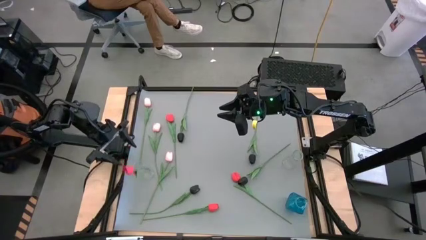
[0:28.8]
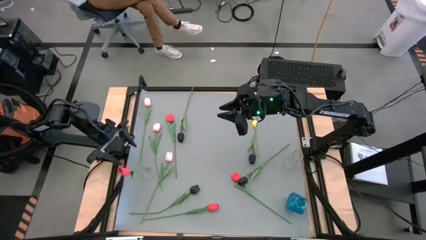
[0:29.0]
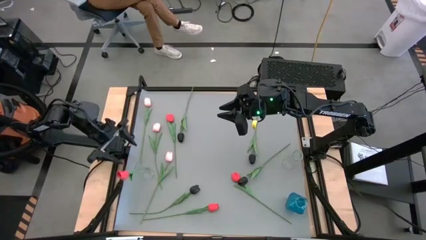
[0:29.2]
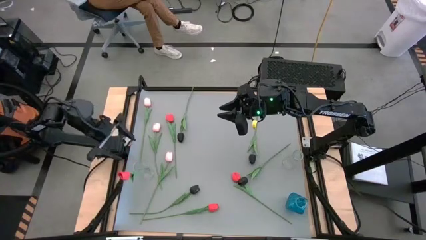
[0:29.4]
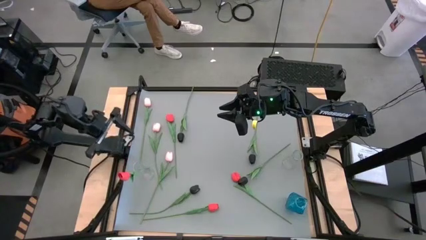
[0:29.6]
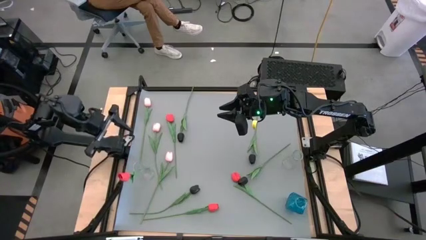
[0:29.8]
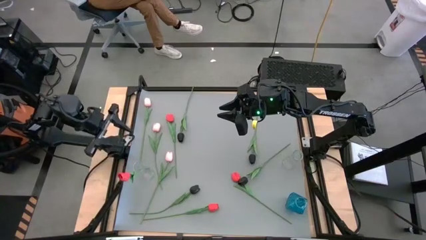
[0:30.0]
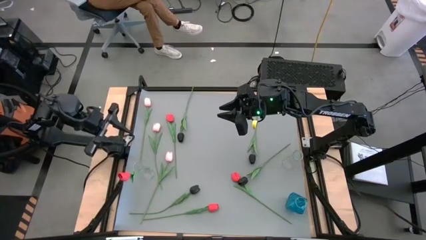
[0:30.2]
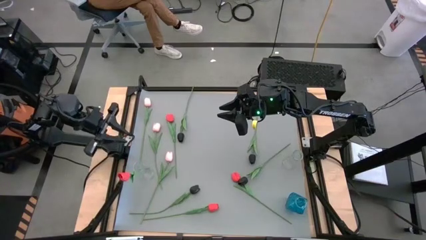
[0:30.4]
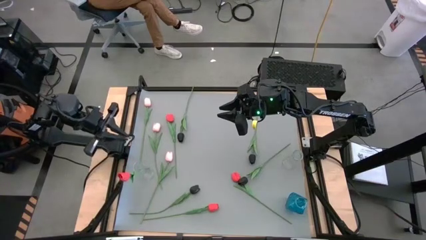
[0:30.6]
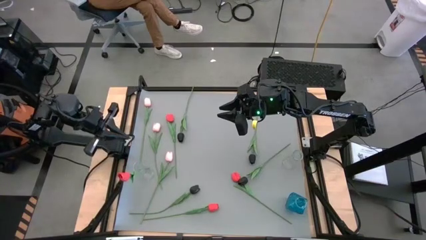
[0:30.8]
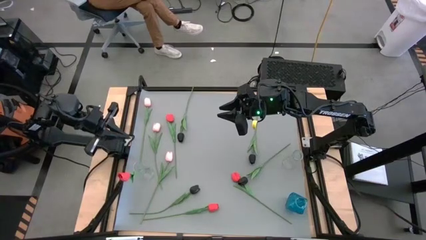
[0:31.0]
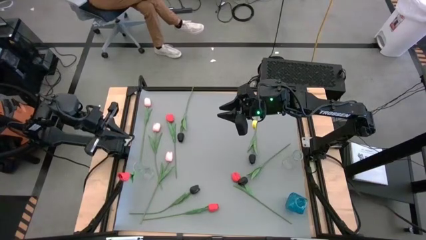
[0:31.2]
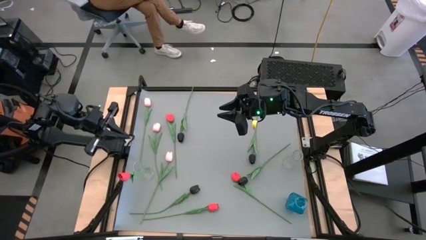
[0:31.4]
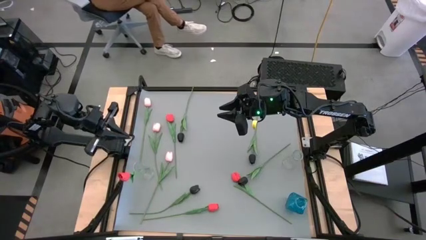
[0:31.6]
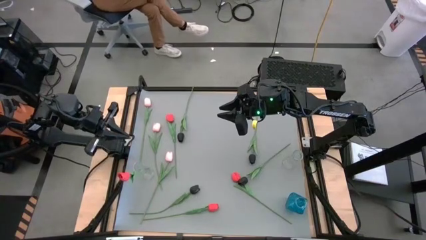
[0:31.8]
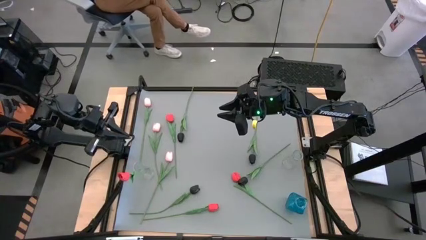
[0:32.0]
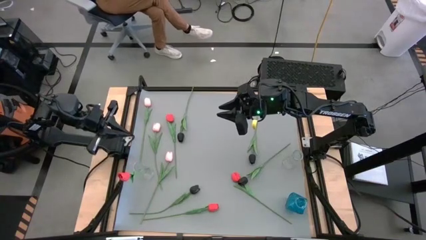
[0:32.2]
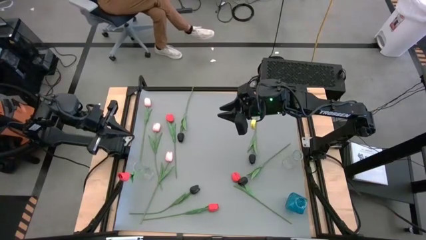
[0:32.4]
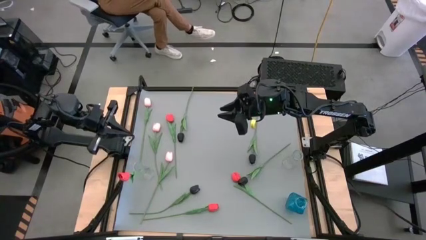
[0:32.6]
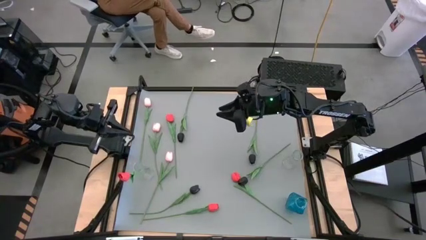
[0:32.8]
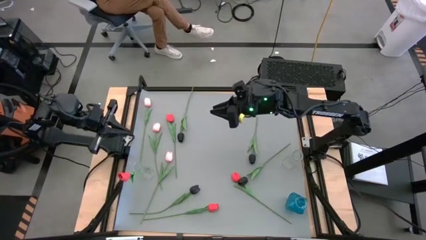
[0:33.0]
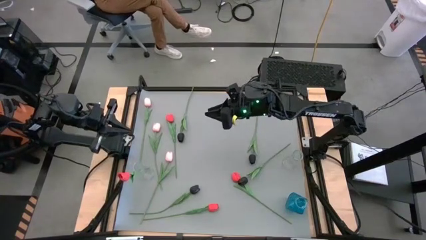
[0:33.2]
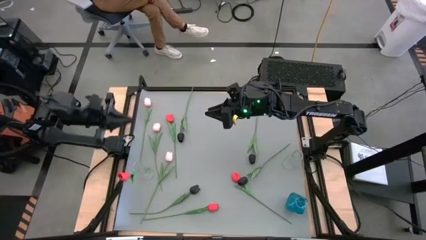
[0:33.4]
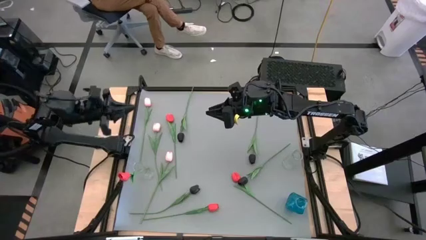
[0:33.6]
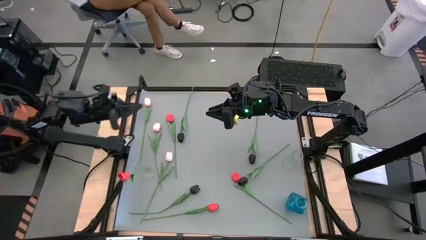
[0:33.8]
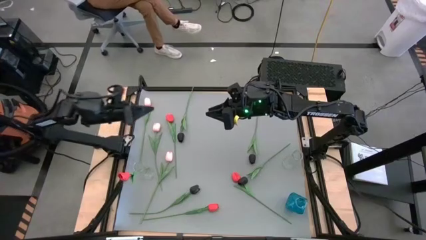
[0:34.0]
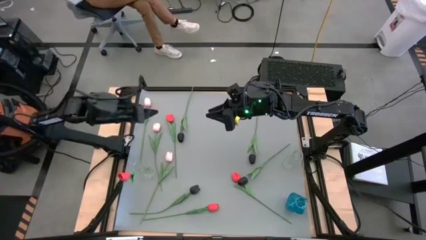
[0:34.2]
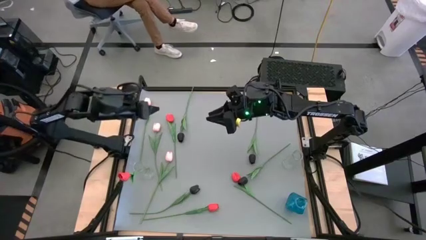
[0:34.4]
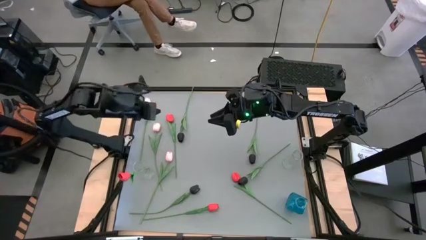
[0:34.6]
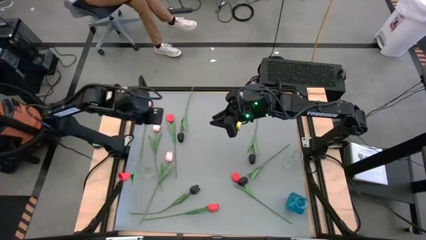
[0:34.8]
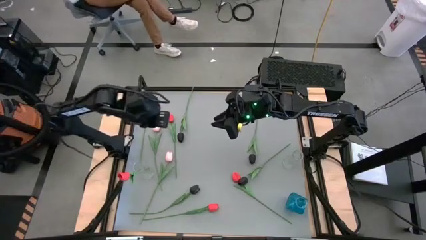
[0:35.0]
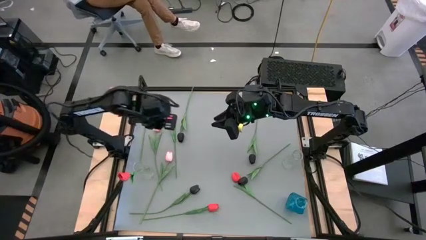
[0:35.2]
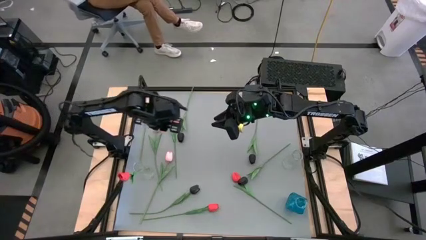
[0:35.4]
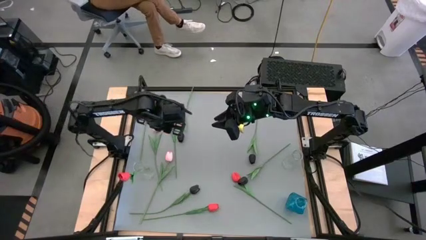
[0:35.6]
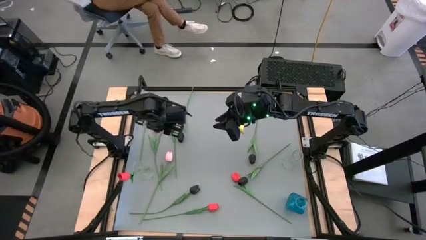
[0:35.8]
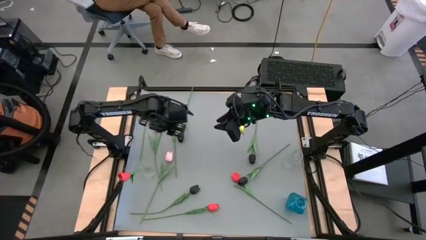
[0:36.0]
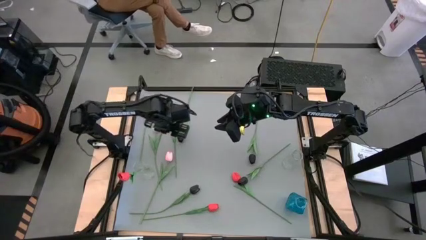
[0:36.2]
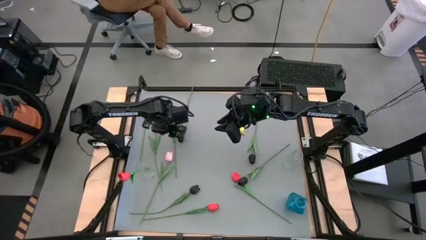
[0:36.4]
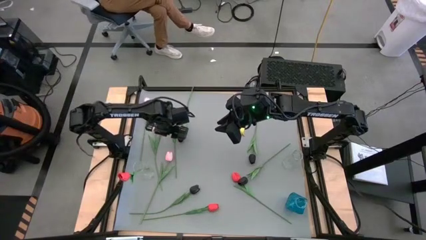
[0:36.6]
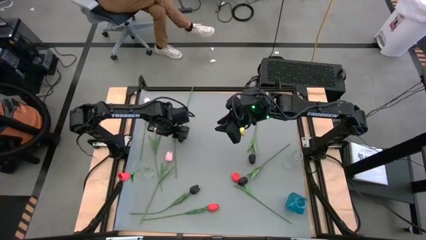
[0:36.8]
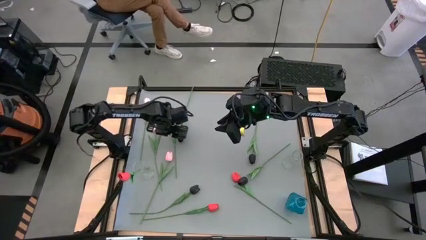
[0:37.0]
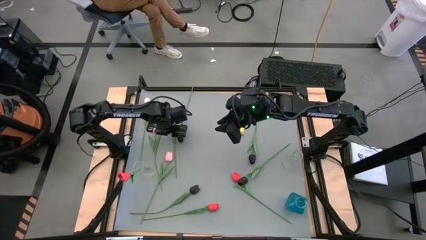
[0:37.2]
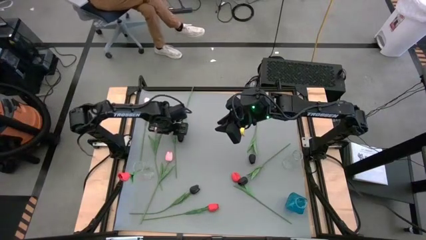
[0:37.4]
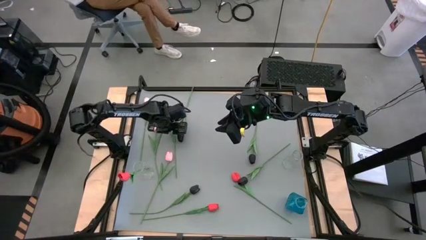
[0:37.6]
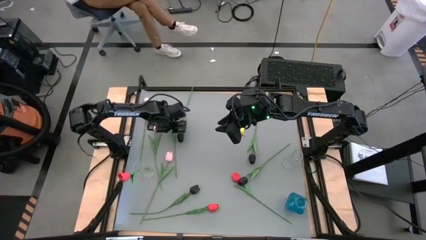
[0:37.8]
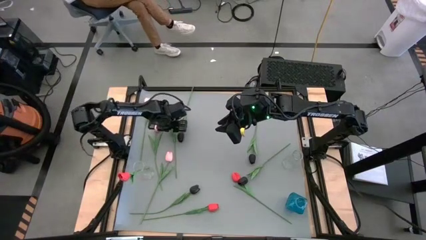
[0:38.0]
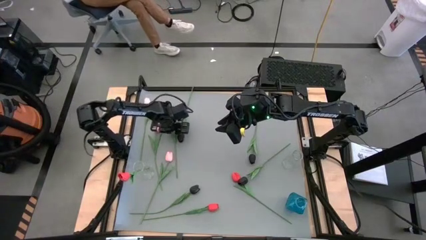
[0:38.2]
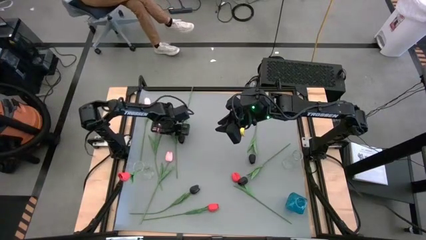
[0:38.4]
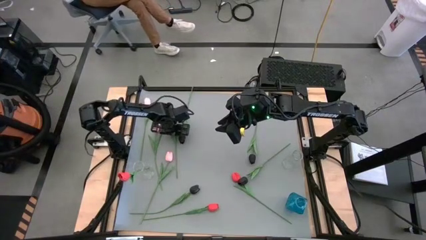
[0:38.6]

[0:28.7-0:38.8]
Task: Sort flowers into vase by color
Put the top red tulip into the left transparent vase
